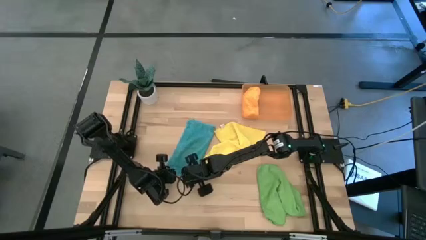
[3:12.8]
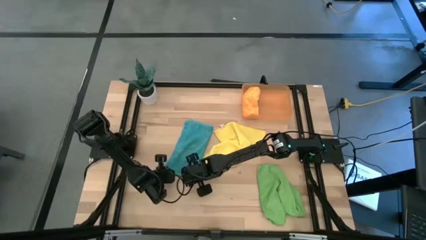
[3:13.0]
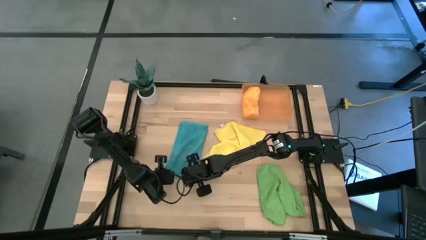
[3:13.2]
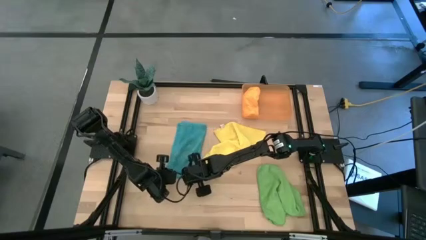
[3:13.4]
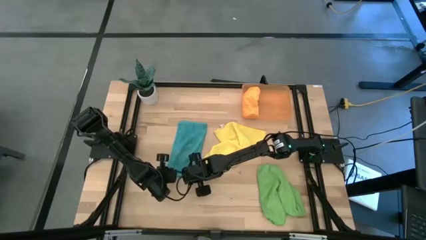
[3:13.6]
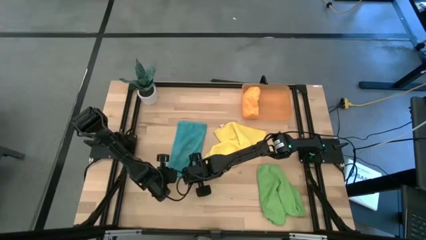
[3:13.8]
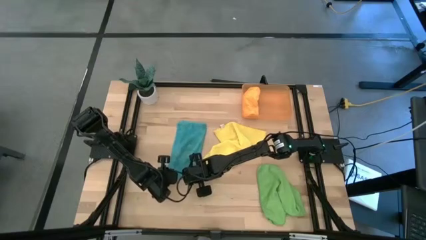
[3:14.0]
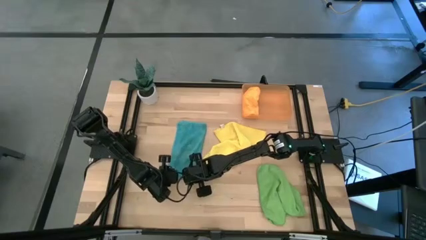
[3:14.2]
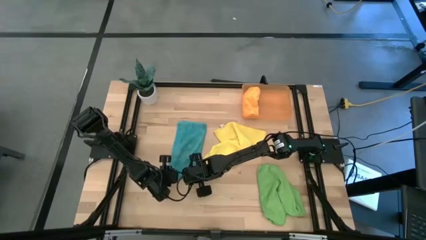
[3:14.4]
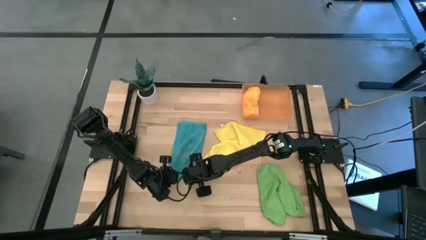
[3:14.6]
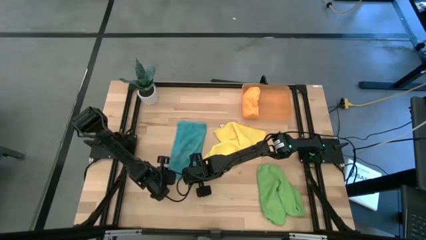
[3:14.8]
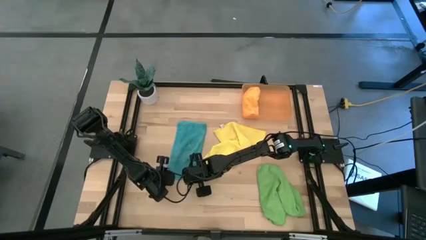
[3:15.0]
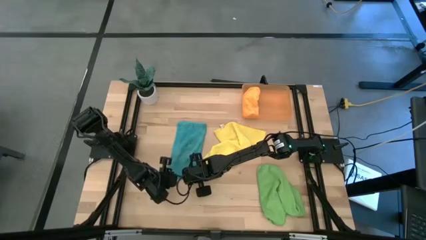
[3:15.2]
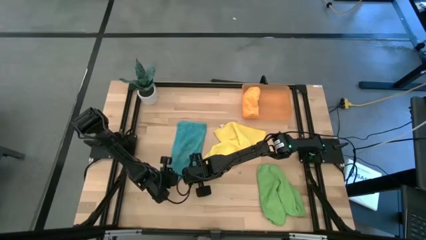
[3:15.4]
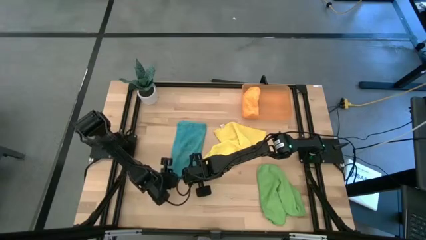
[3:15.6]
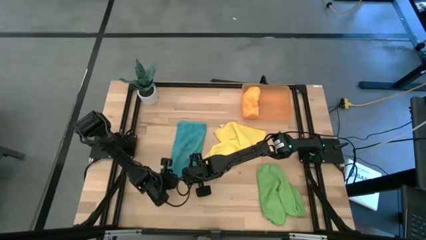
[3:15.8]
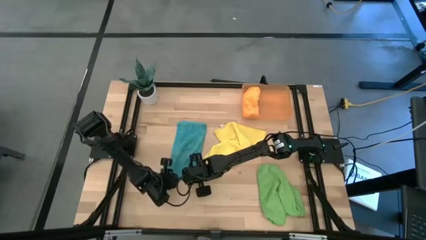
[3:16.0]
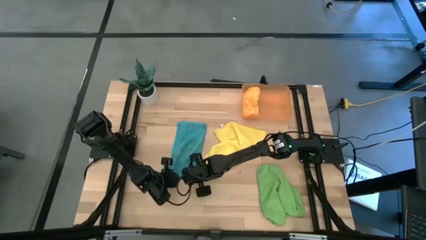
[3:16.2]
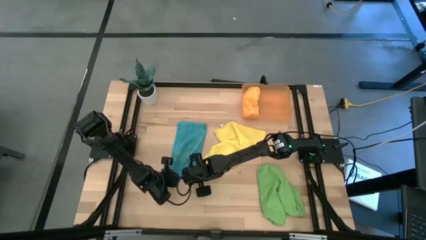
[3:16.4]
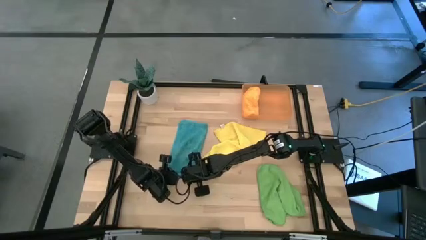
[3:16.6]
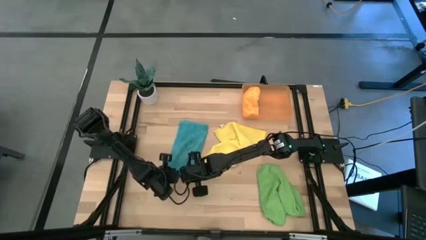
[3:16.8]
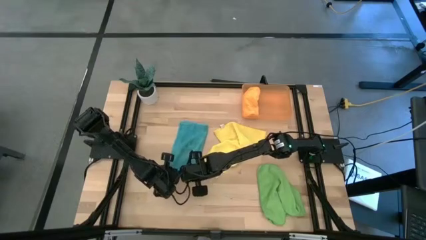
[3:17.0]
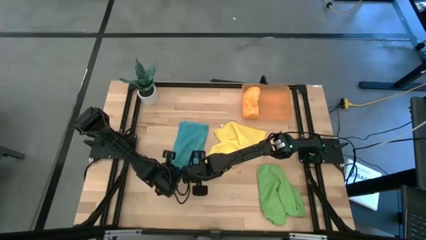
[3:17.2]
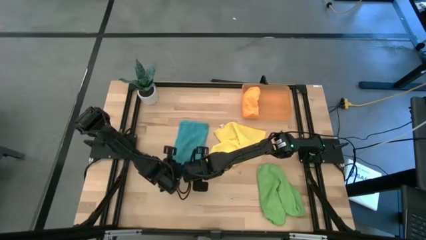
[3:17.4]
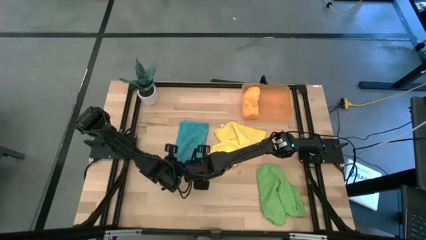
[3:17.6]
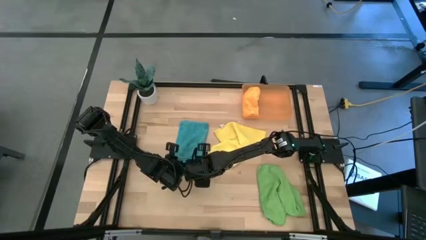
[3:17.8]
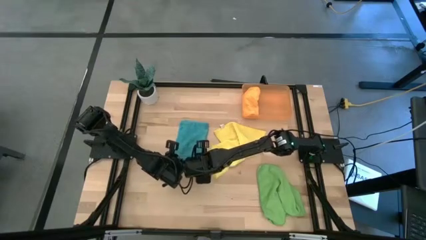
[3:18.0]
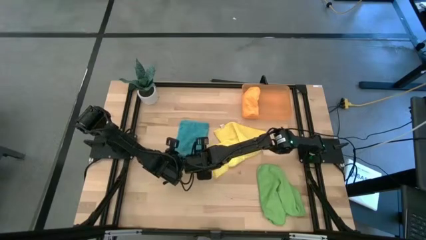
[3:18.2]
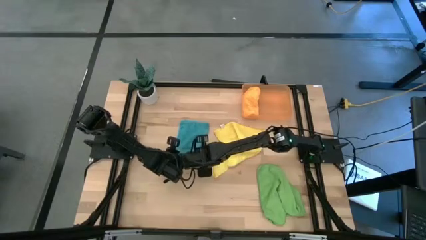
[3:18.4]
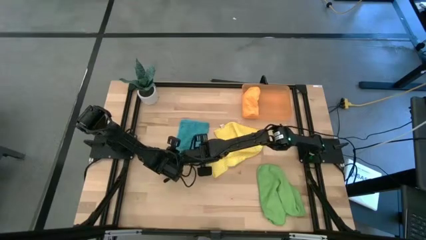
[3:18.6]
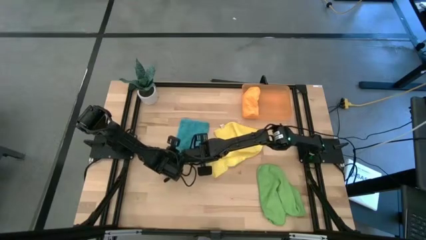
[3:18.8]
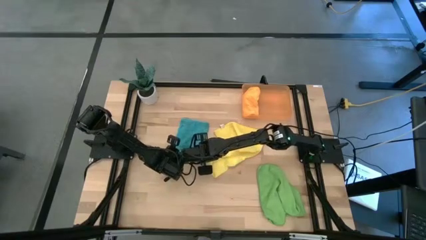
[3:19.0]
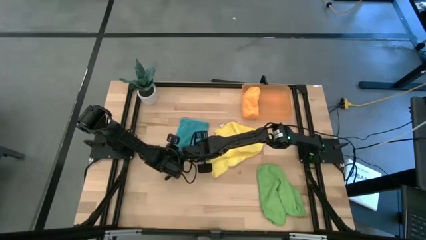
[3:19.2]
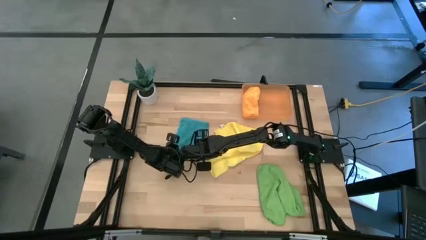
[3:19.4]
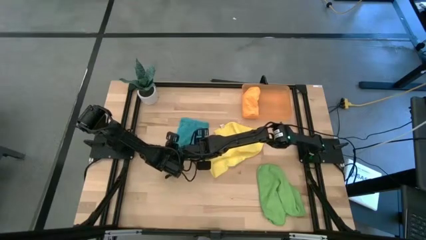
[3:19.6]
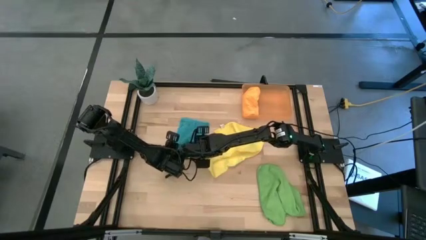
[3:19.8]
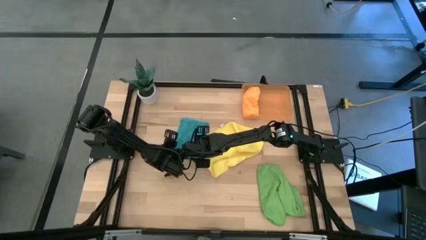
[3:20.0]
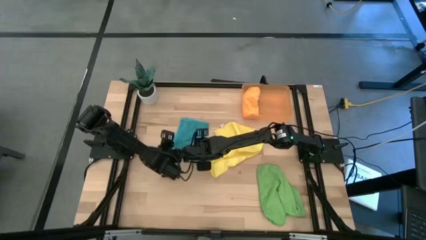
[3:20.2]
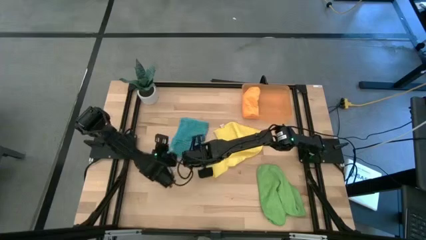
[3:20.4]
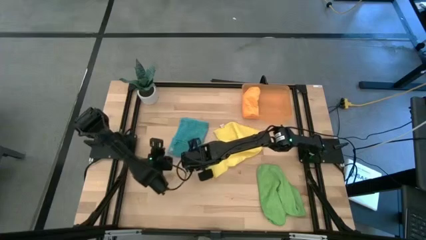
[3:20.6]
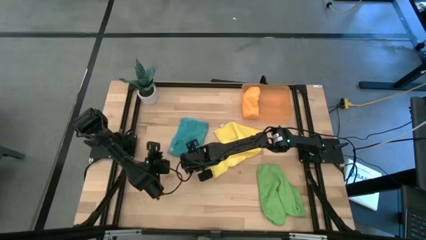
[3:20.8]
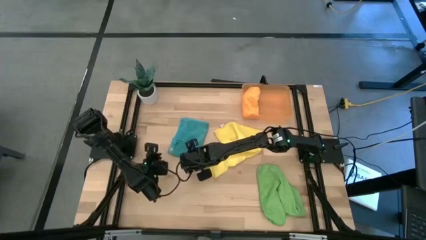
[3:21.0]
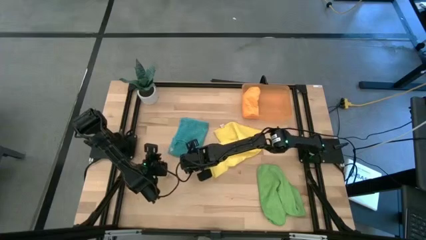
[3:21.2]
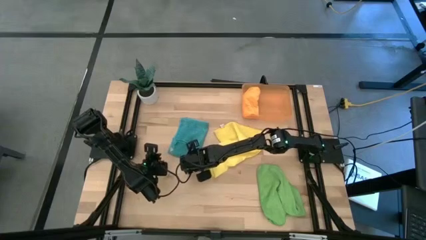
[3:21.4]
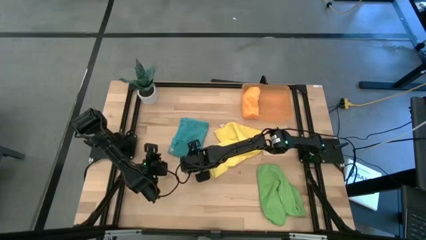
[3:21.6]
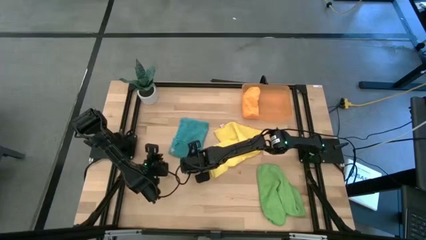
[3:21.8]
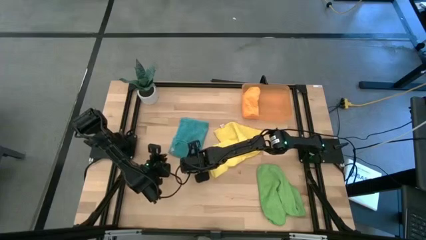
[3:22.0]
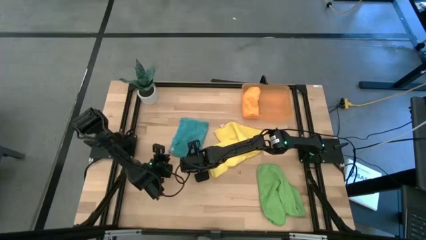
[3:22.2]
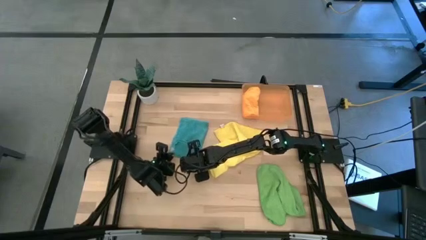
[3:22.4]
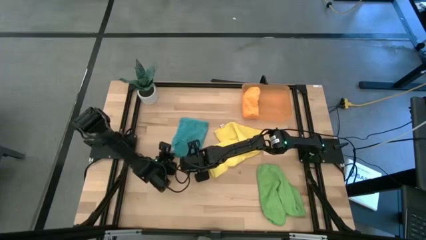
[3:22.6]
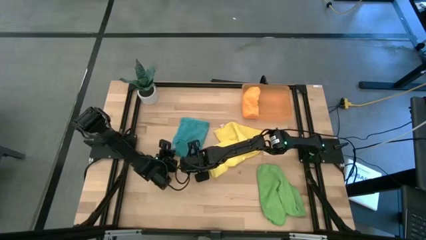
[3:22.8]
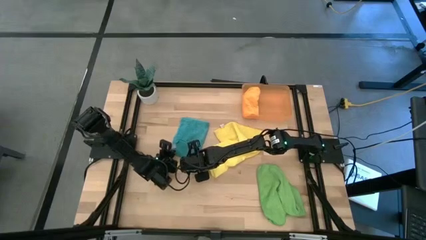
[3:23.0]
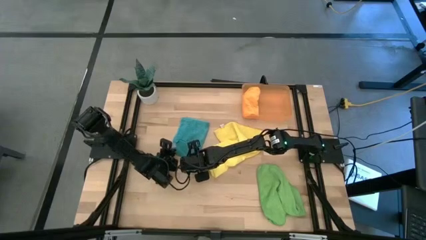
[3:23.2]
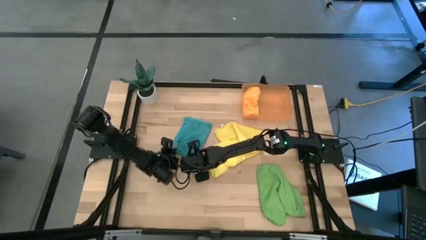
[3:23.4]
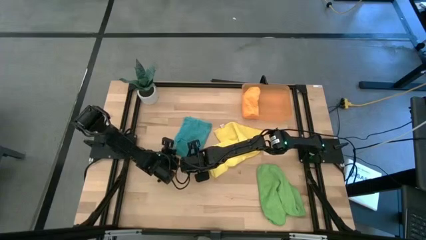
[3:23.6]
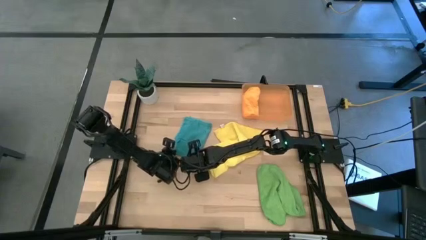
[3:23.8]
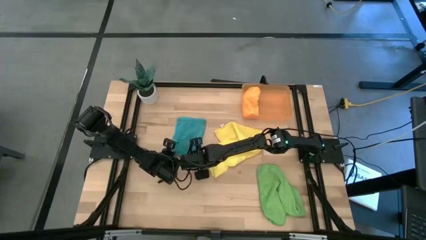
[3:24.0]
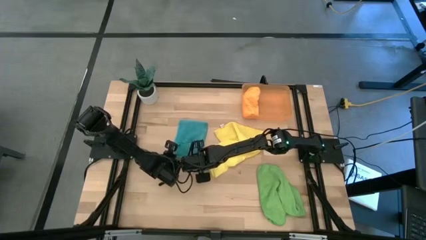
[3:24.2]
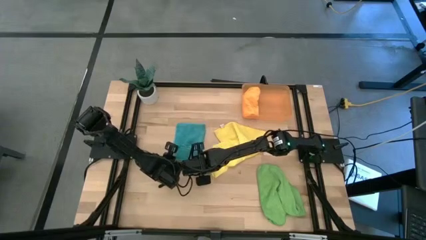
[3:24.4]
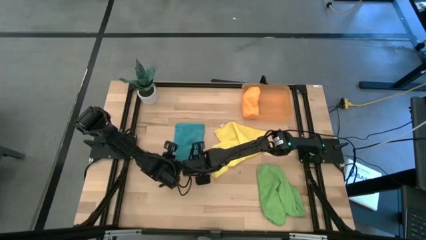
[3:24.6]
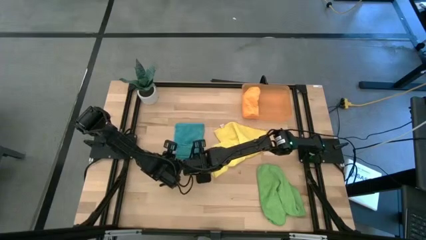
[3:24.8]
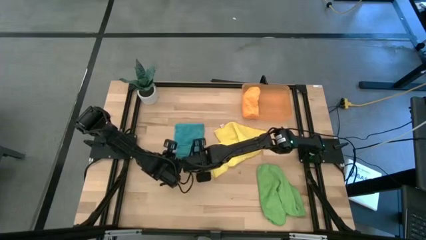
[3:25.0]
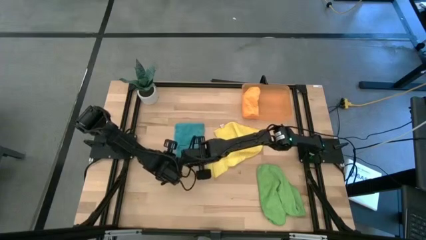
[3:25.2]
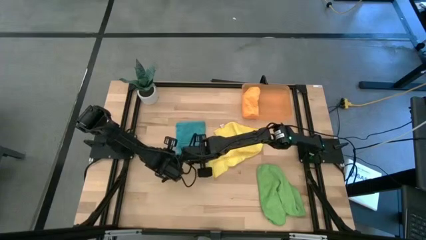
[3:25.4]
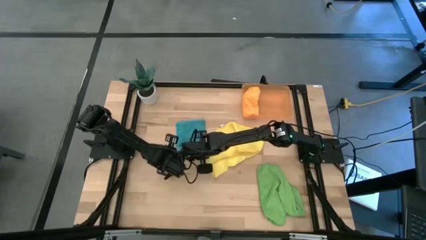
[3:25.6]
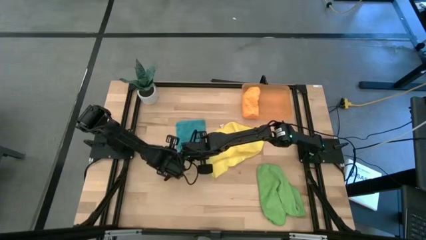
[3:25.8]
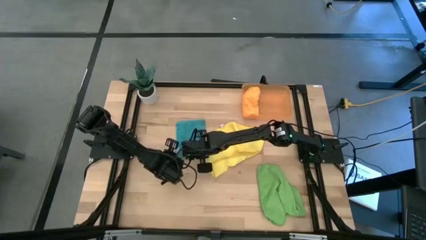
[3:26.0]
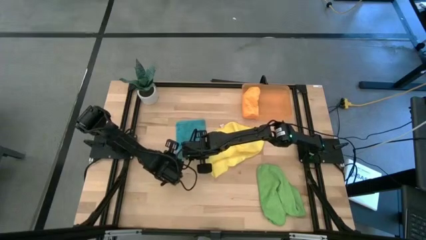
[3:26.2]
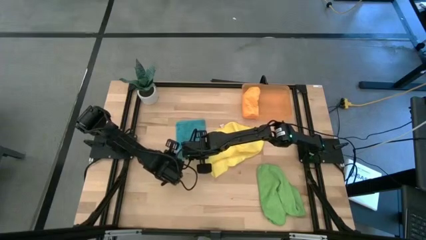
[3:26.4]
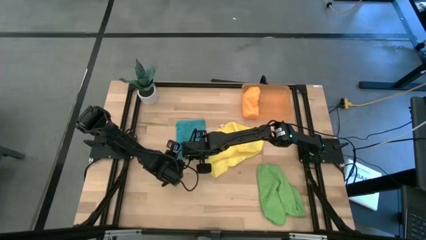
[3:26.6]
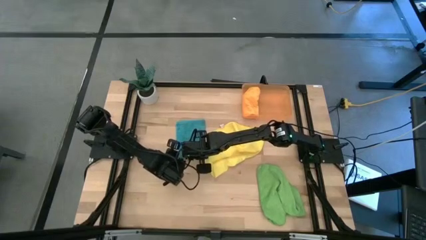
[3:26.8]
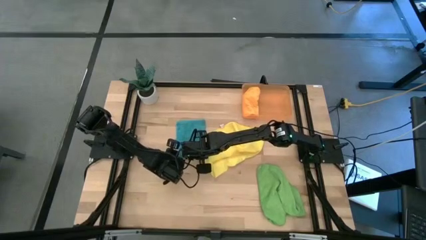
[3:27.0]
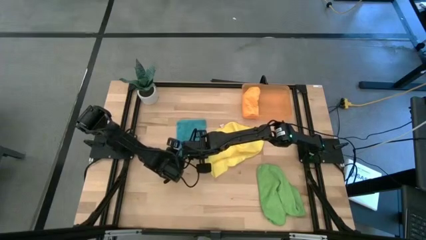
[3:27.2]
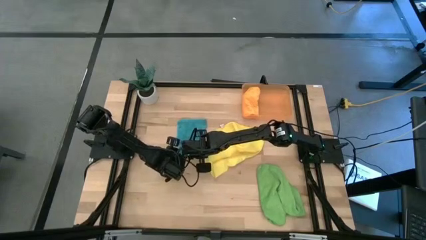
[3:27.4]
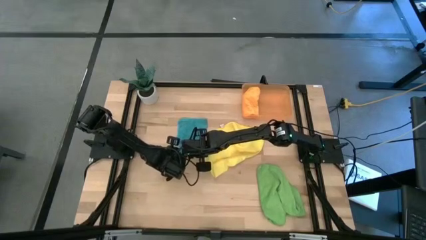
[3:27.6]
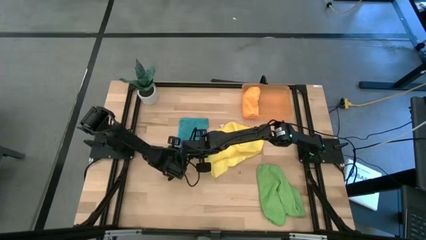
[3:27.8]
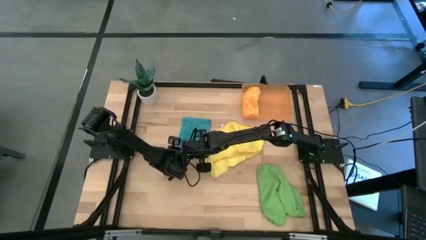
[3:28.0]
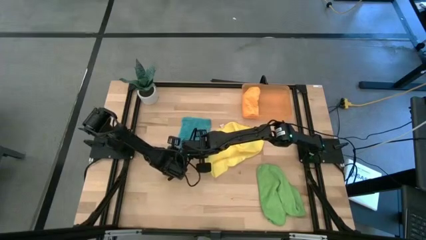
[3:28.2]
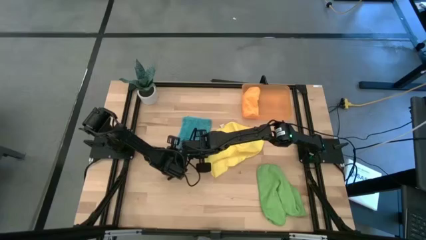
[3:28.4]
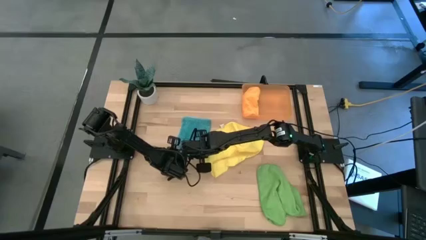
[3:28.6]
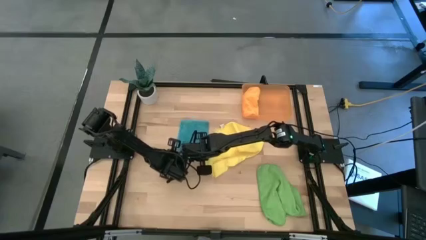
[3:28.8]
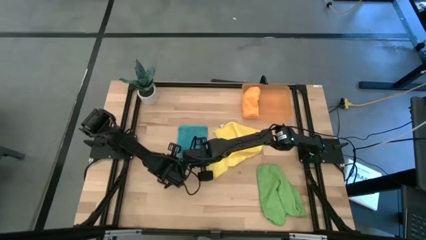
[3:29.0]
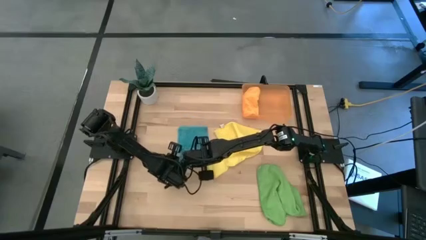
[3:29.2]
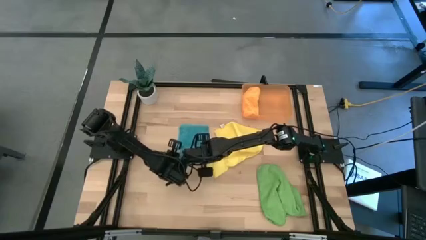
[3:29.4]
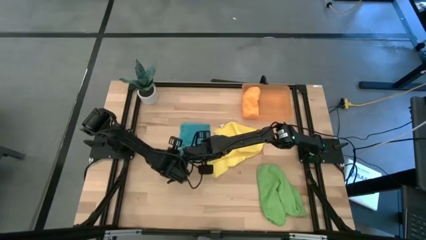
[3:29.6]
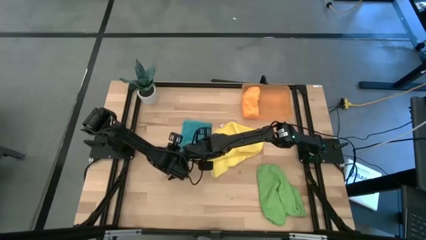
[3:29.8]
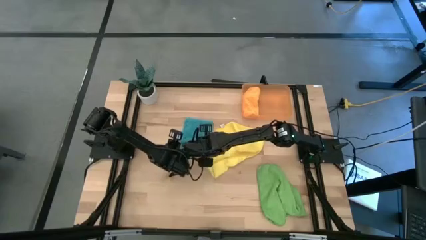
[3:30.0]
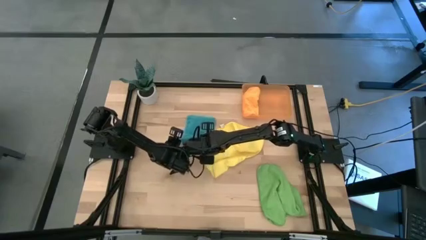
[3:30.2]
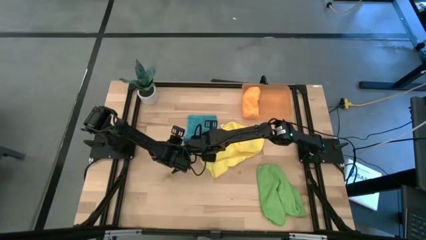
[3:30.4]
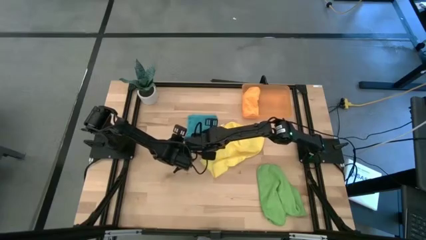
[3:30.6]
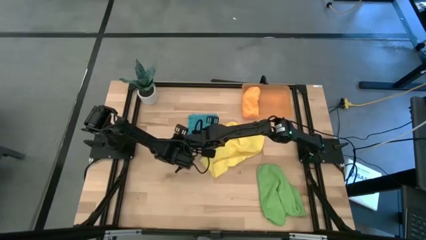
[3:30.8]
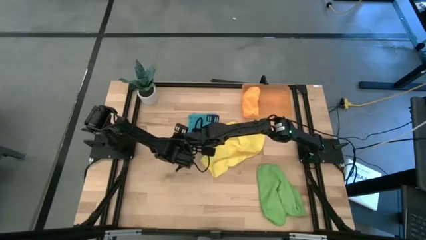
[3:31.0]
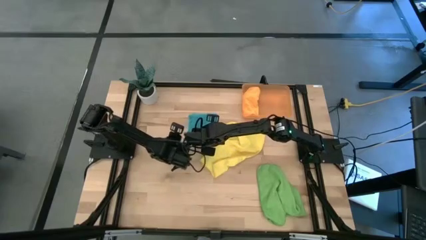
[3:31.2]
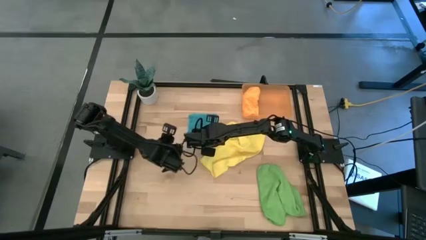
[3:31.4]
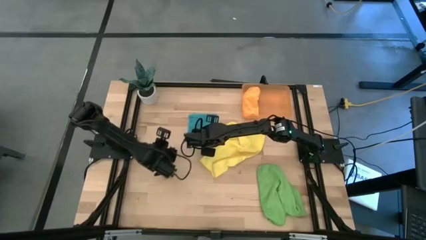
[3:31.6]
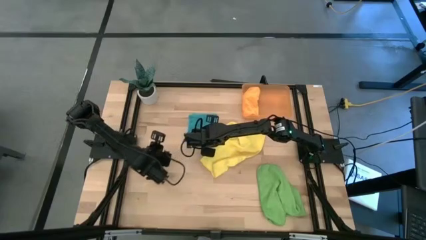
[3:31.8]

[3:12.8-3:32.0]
Task: Roll microfiber towels into tight, uniform cylinder then place into a basket
Roll the blue microfiber towel
